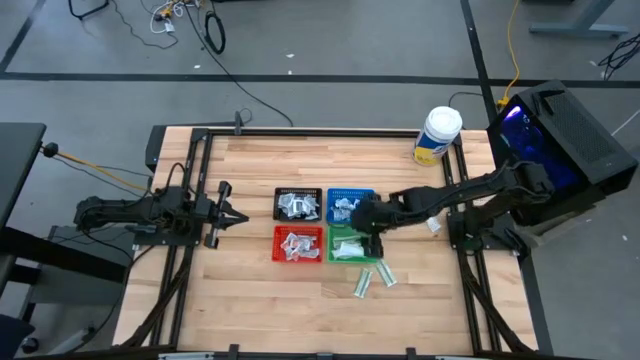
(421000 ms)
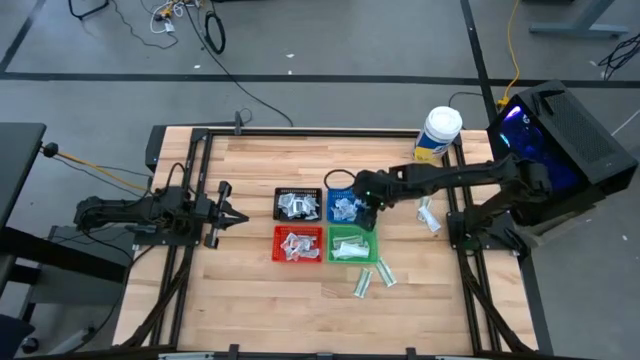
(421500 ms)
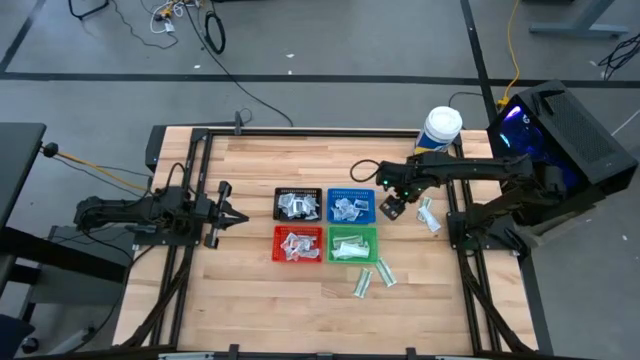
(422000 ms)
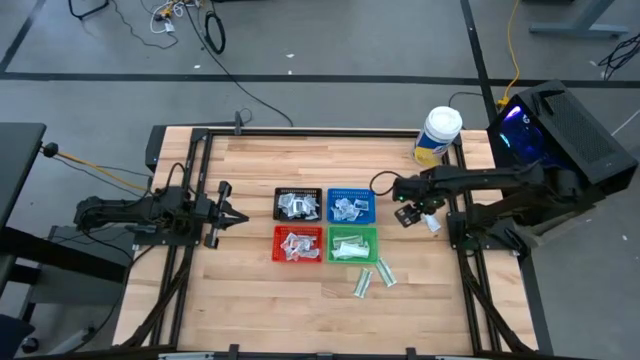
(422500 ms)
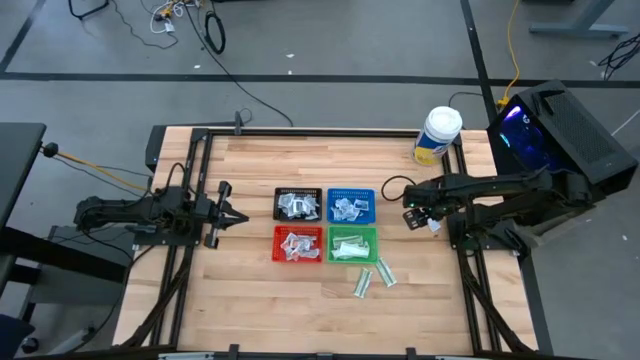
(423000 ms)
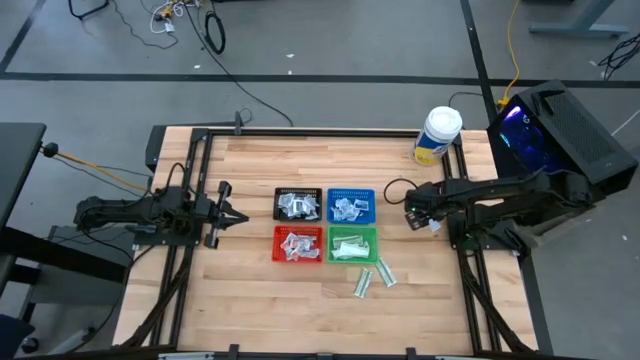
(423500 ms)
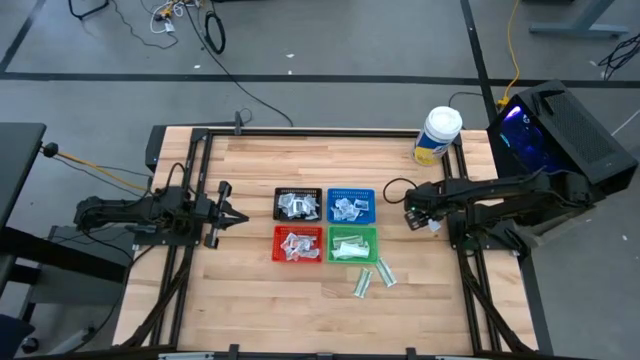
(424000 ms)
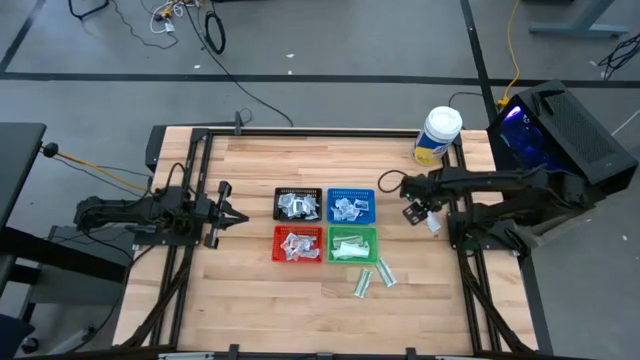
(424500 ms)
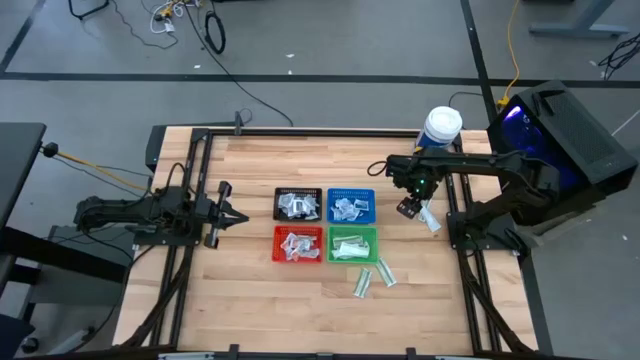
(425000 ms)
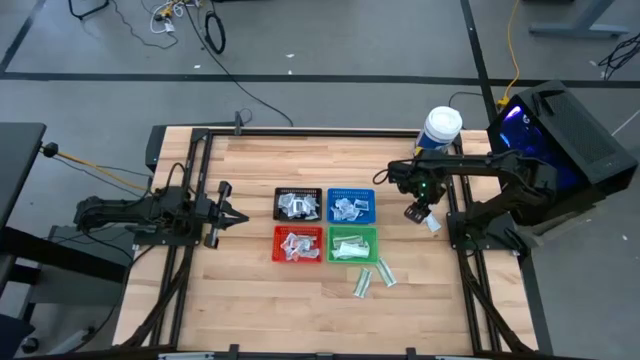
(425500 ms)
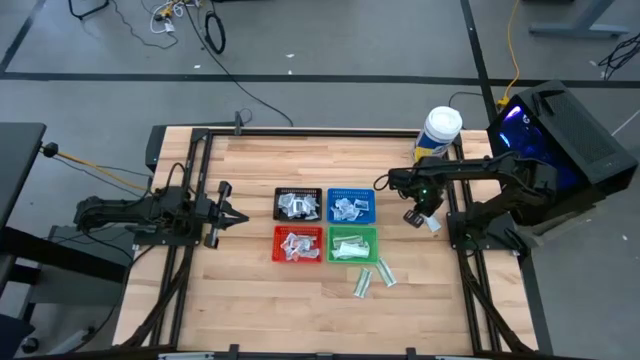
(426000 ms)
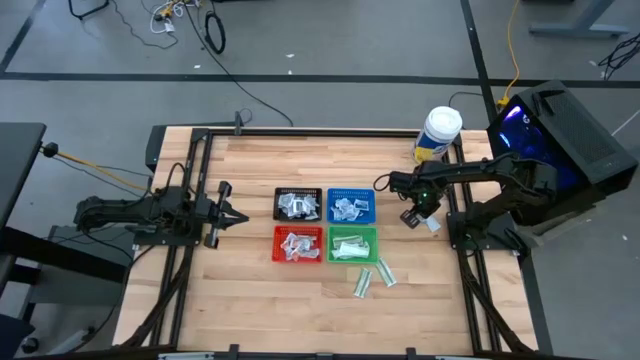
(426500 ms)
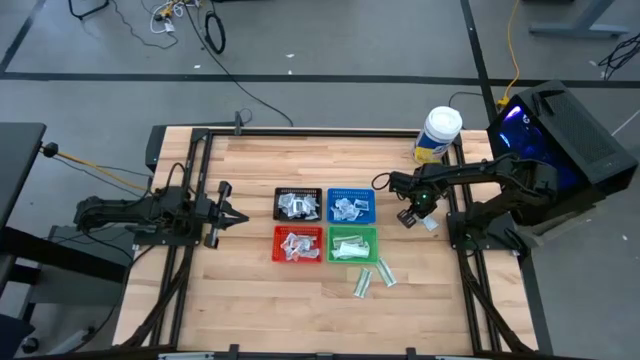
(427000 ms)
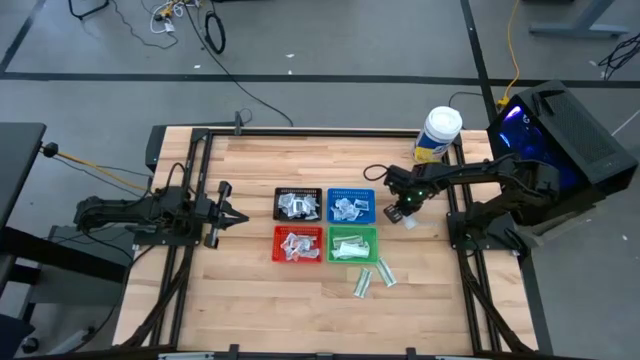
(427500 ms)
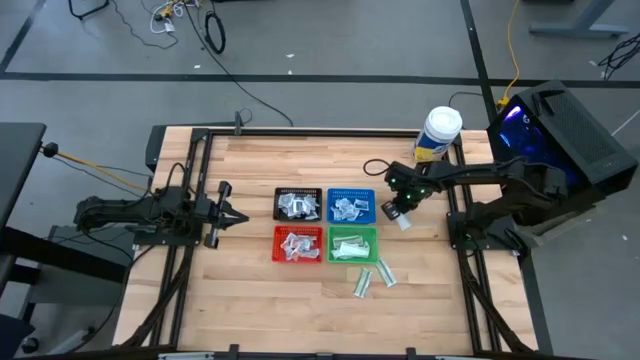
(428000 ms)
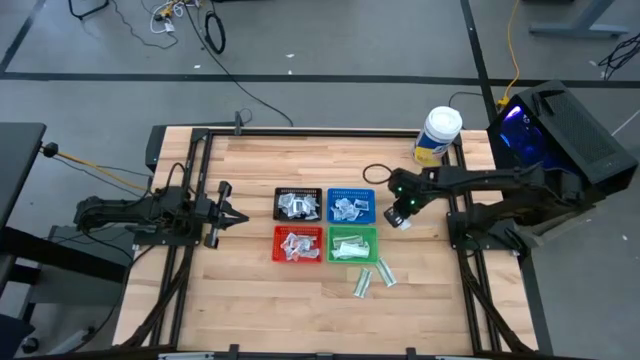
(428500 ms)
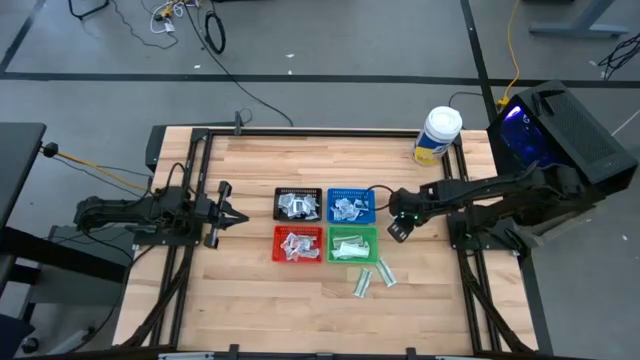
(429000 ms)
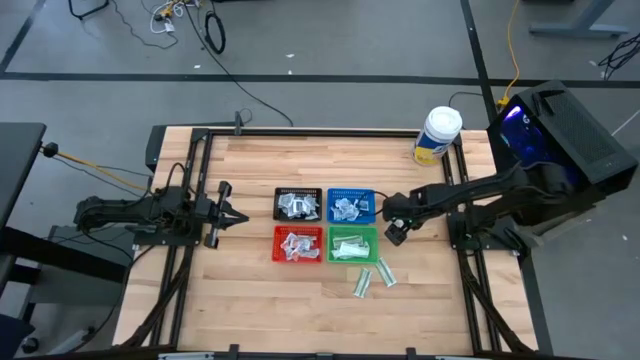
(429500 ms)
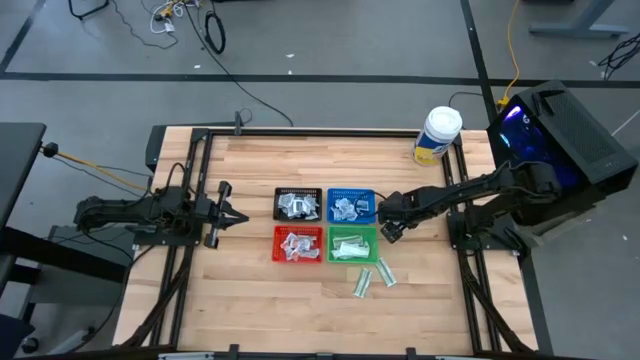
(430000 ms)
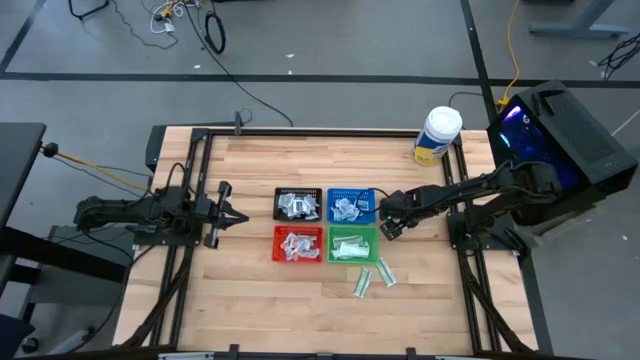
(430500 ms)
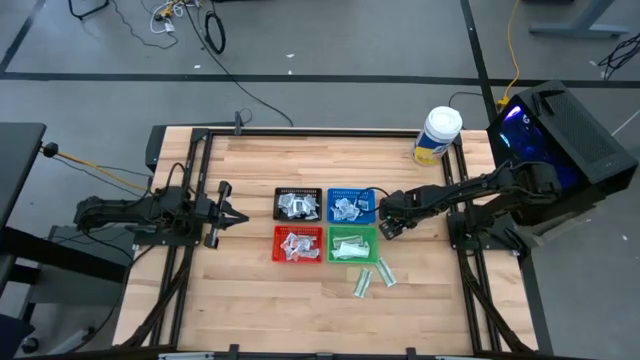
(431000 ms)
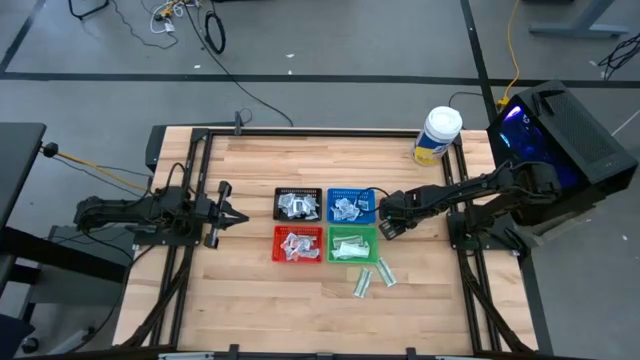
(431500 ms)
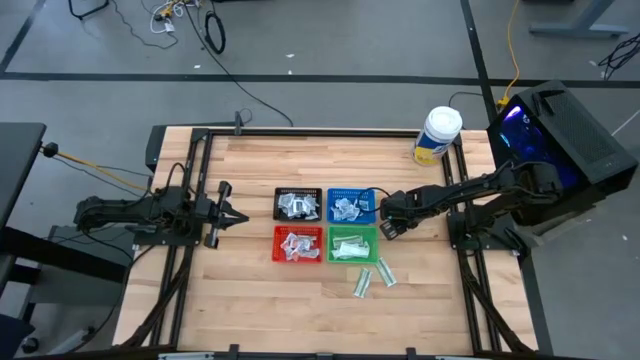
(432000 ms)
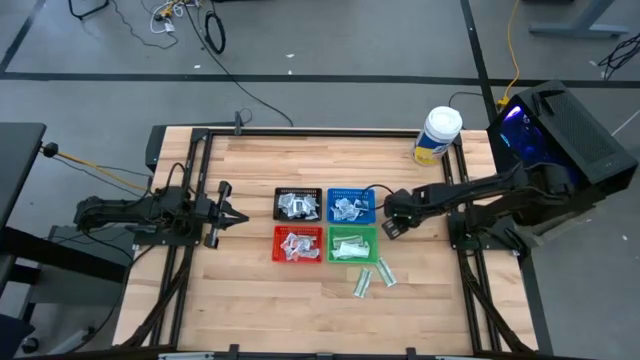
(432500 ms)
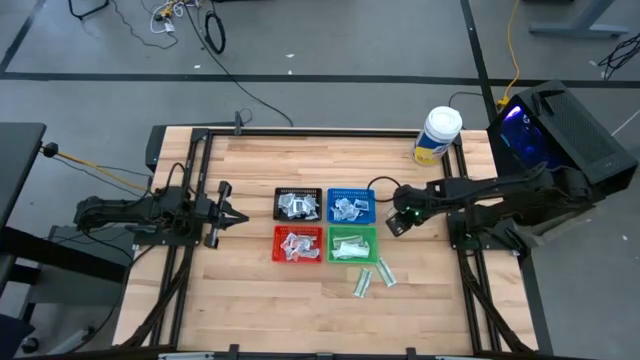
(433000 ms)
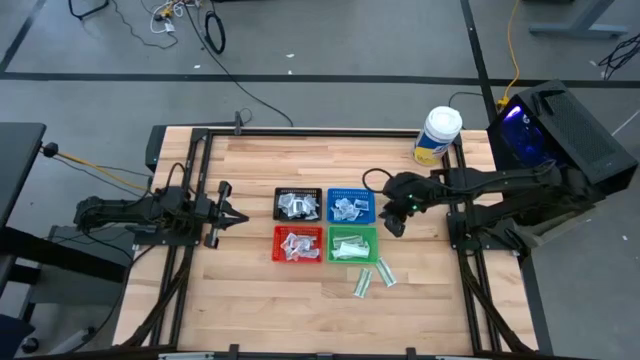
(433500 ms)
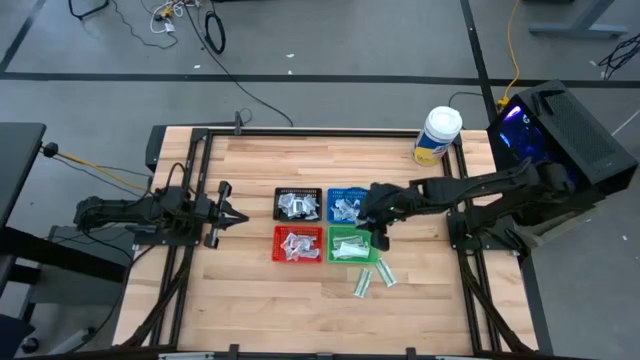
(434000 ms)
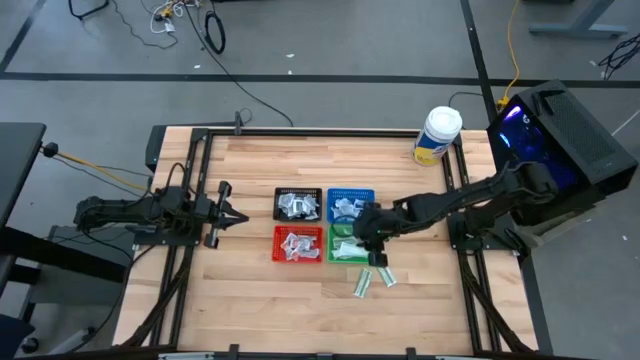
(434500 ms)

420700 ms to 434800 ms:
Task: Pick & Place First Aid Supplies
Put the green bandage pack into the green bin

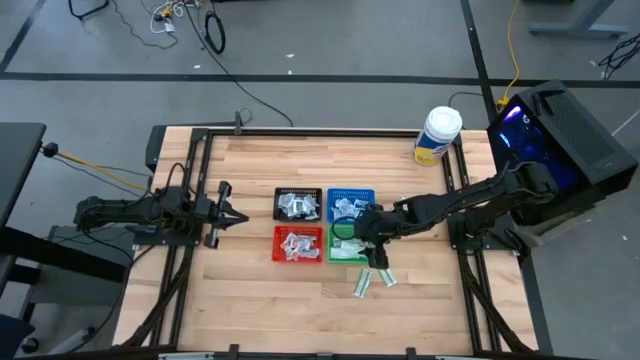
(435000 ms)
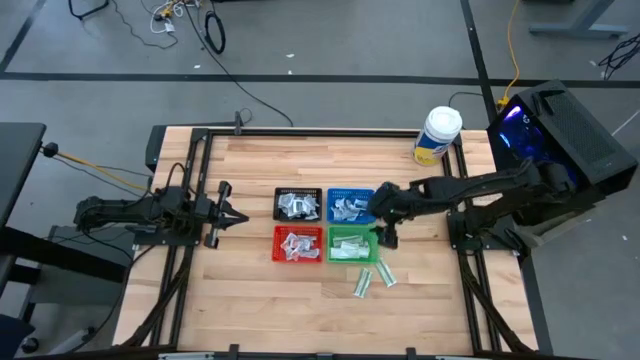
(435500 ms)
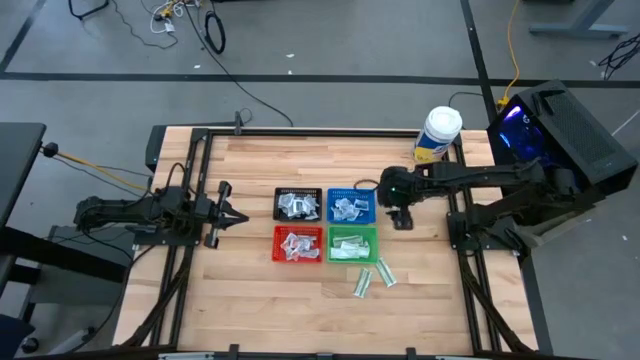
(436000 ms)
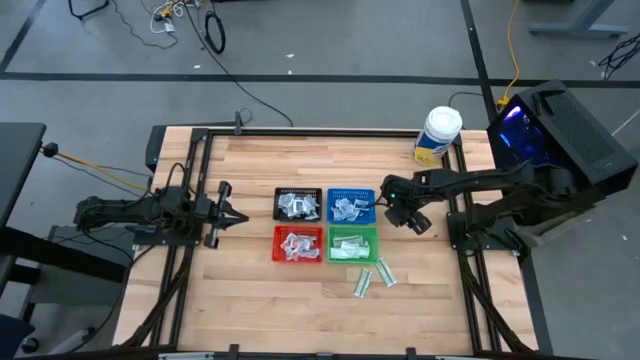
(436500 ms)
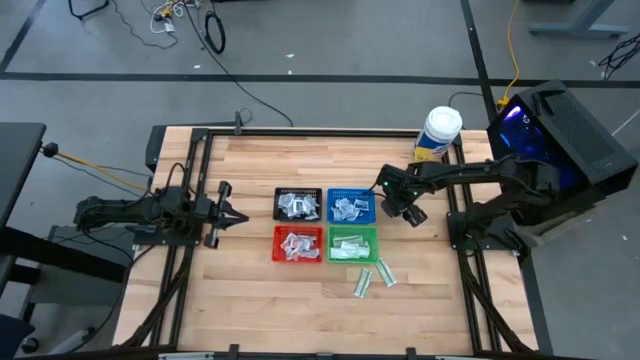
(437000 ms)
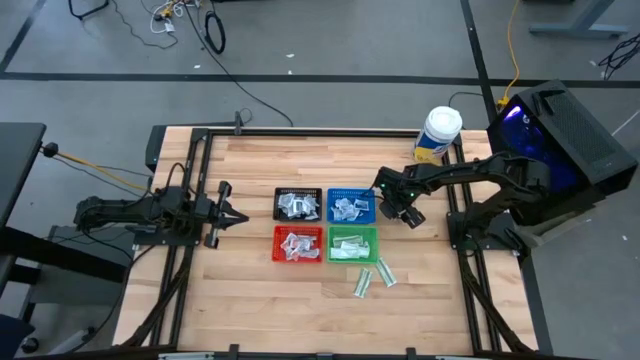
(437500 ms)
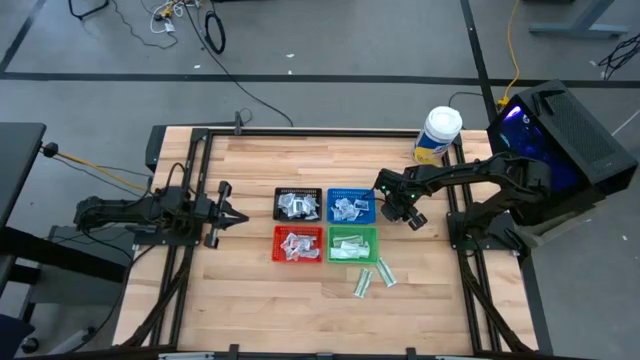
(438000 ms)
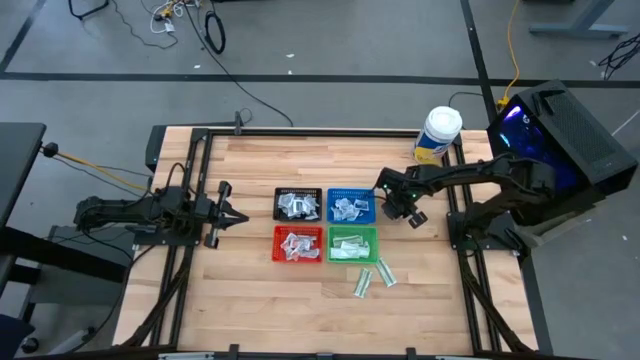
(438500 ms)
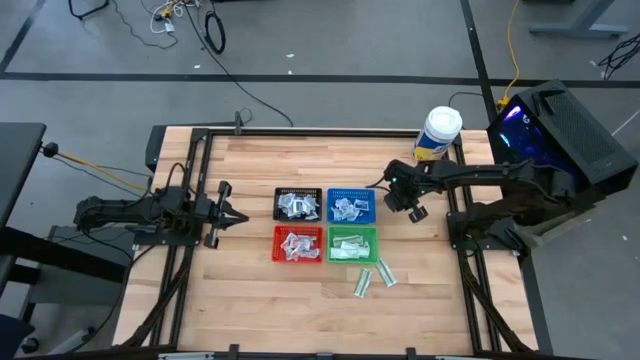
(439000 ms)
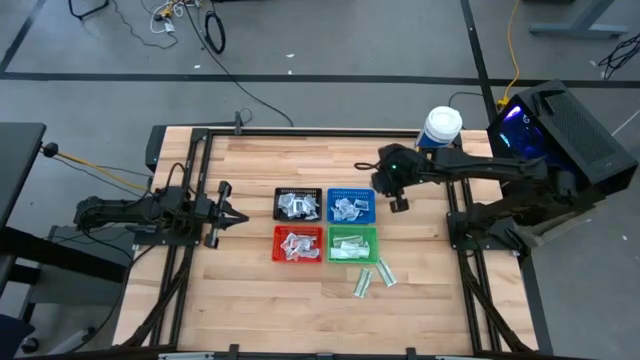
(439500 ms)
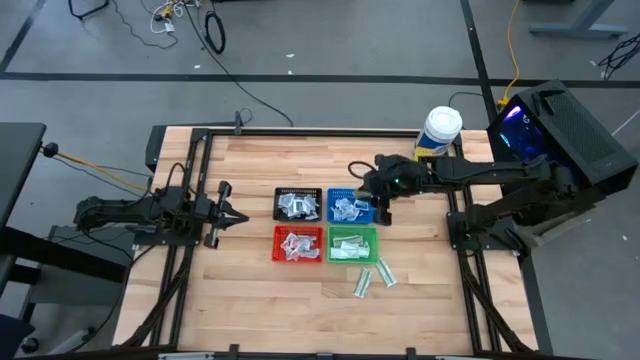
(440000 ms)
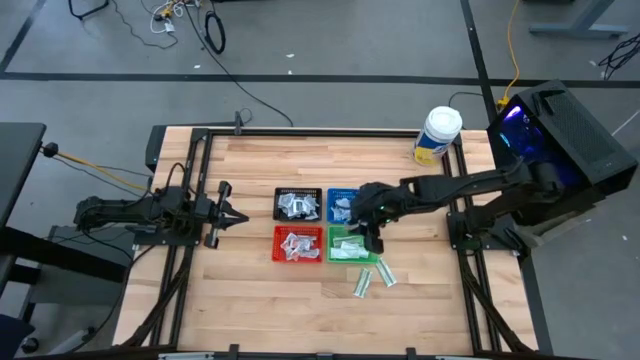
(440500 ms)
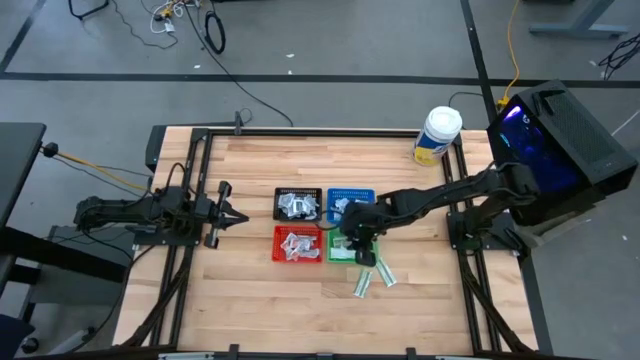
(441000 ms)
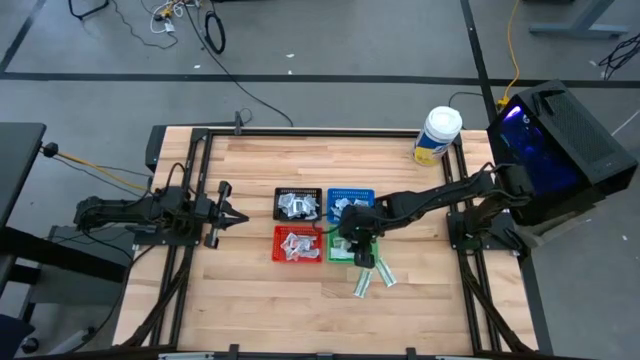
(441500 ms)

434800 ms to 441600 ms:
Put the top green bandage pack into the green bin
